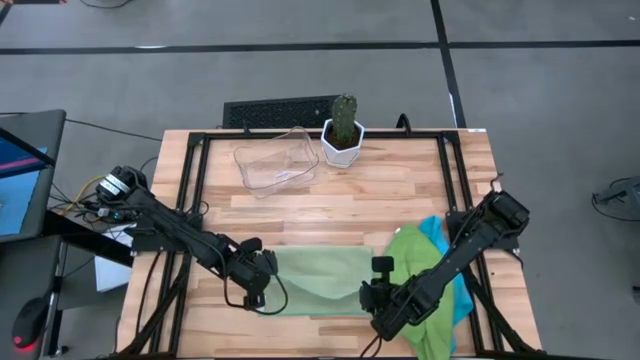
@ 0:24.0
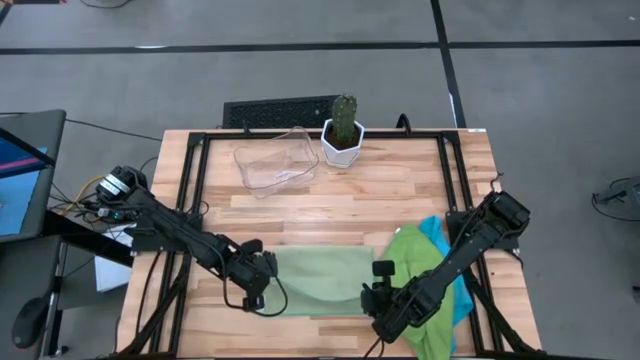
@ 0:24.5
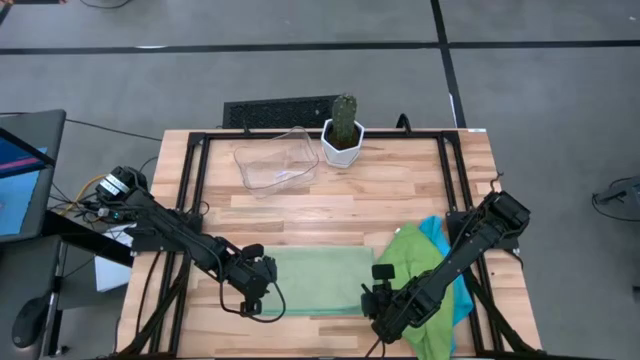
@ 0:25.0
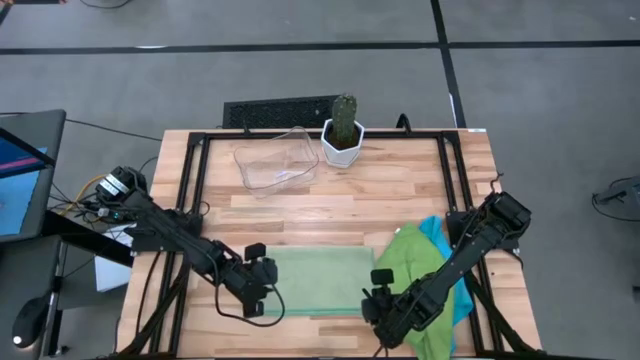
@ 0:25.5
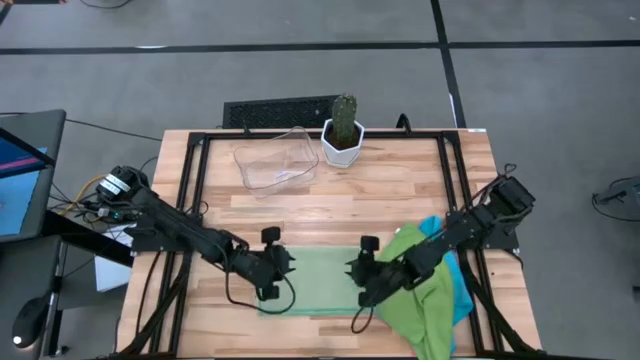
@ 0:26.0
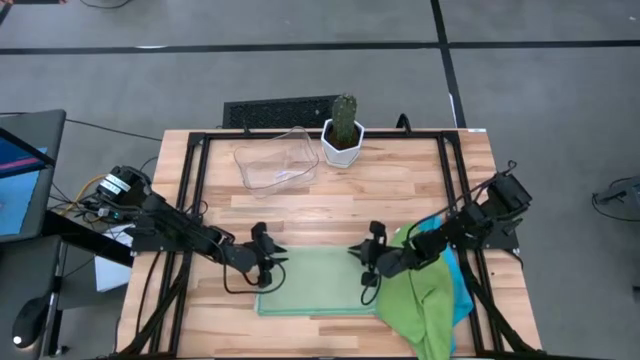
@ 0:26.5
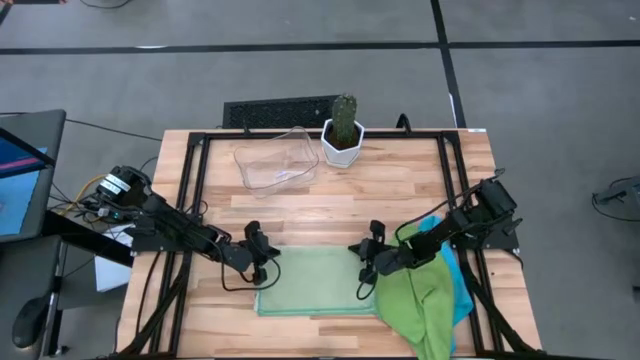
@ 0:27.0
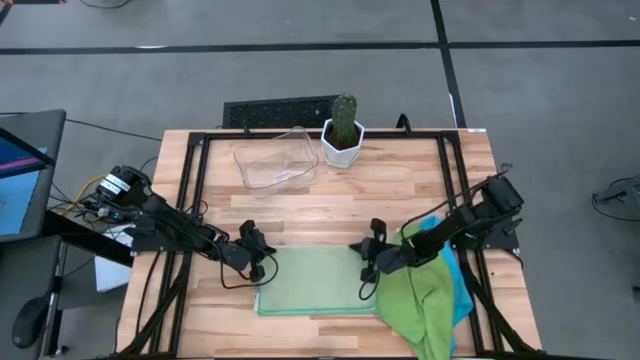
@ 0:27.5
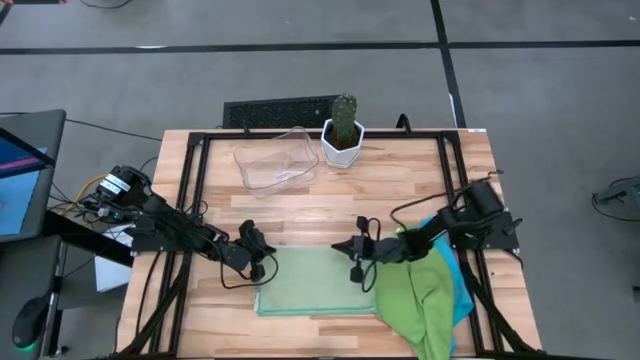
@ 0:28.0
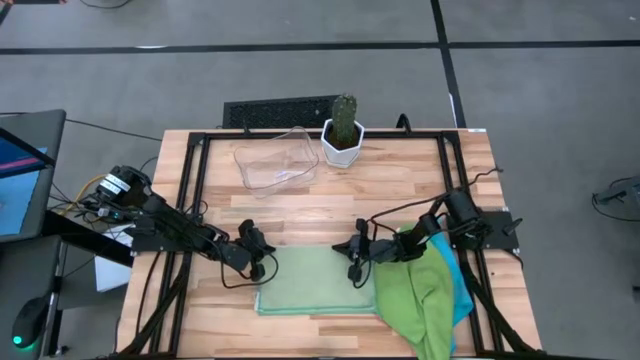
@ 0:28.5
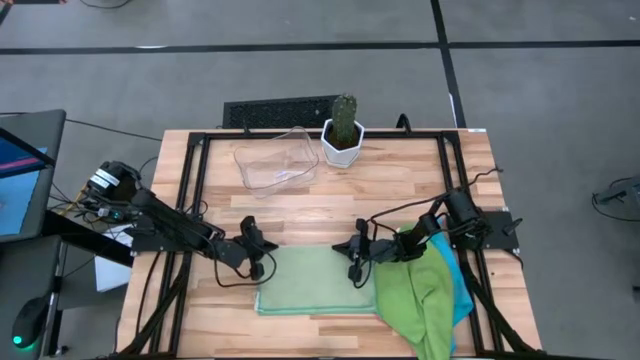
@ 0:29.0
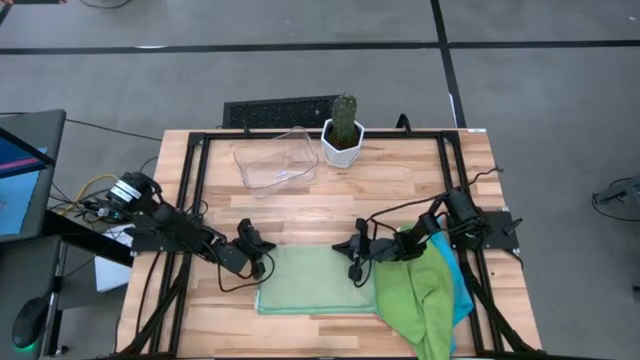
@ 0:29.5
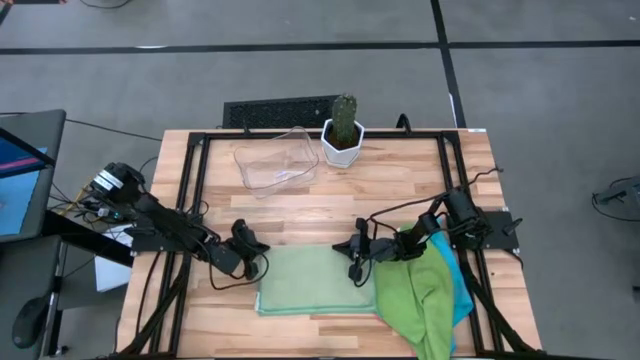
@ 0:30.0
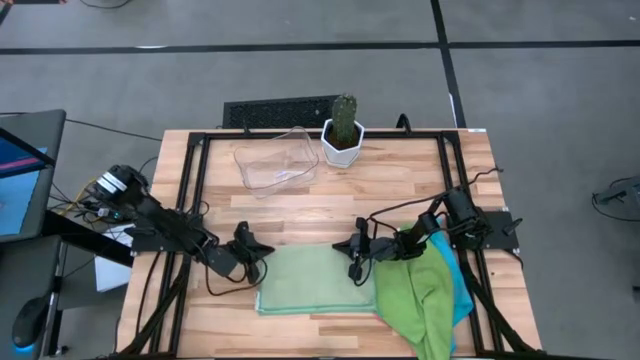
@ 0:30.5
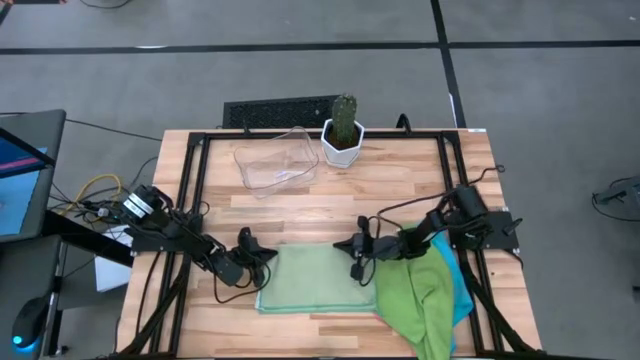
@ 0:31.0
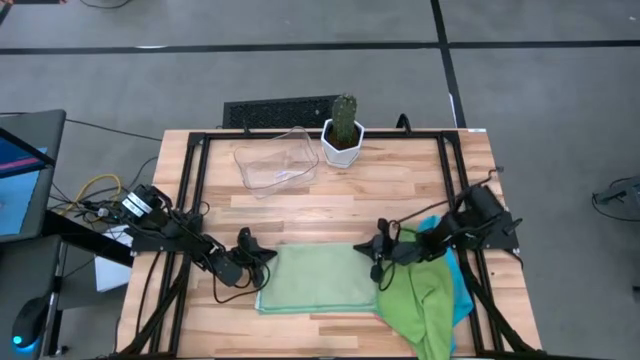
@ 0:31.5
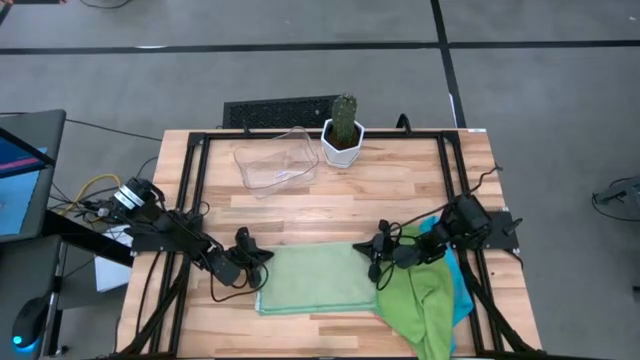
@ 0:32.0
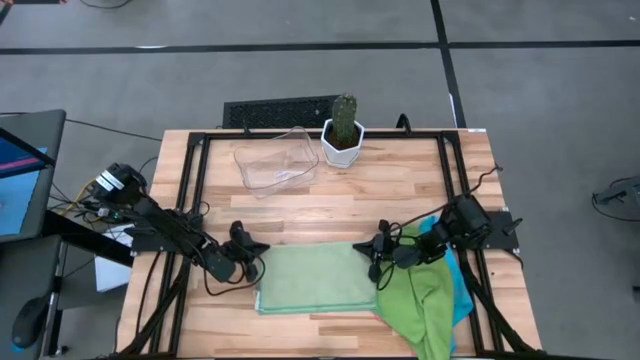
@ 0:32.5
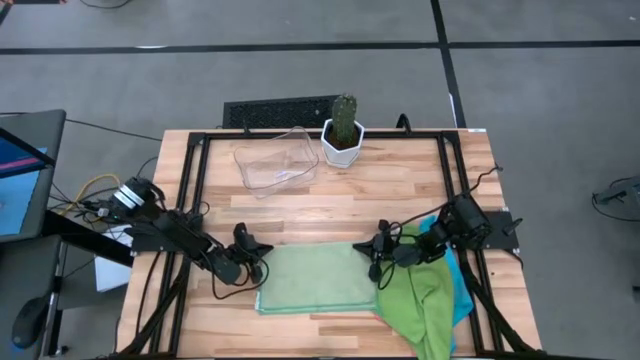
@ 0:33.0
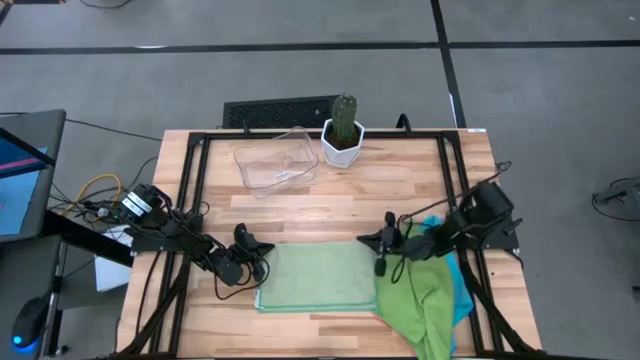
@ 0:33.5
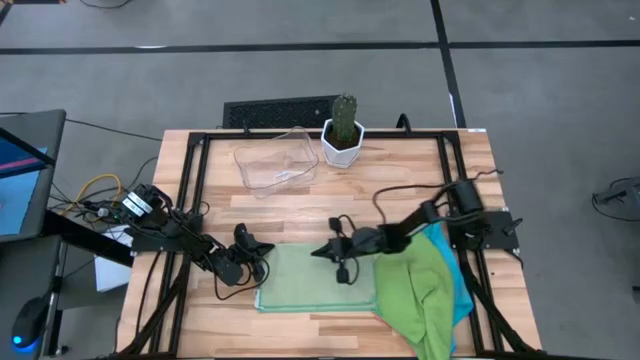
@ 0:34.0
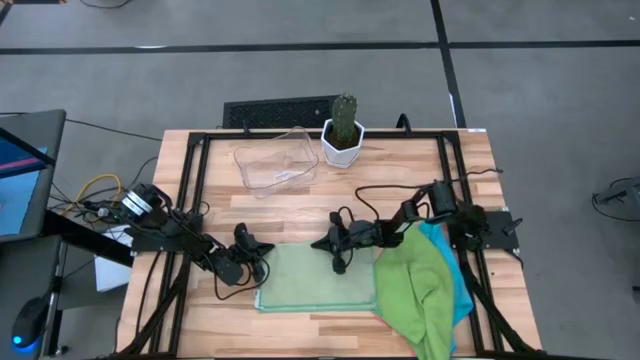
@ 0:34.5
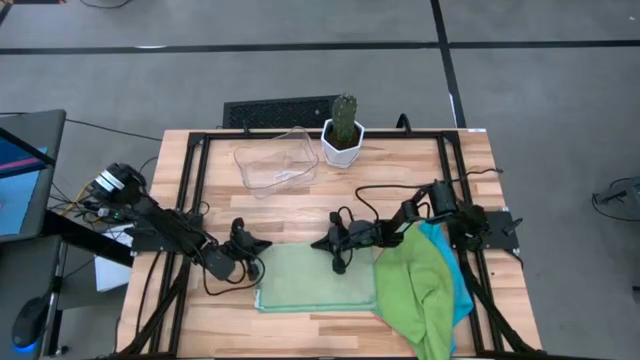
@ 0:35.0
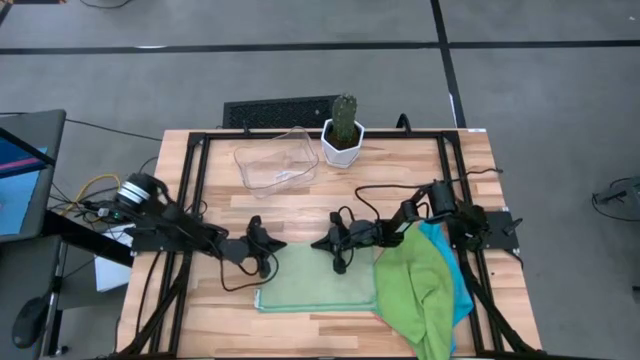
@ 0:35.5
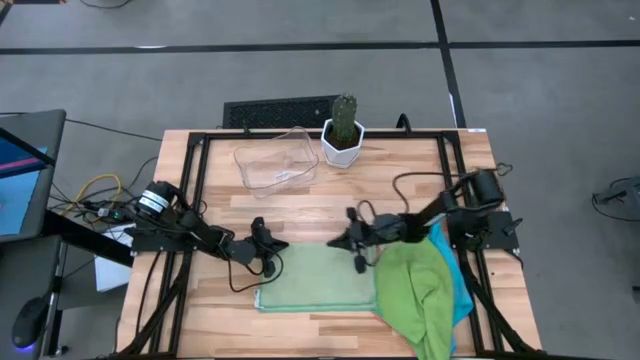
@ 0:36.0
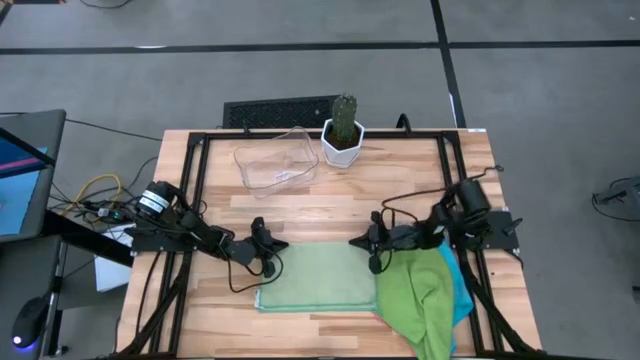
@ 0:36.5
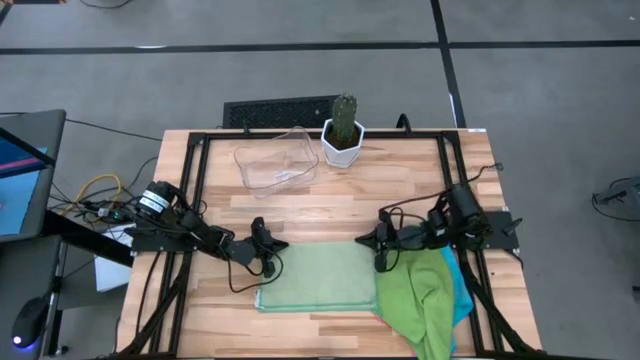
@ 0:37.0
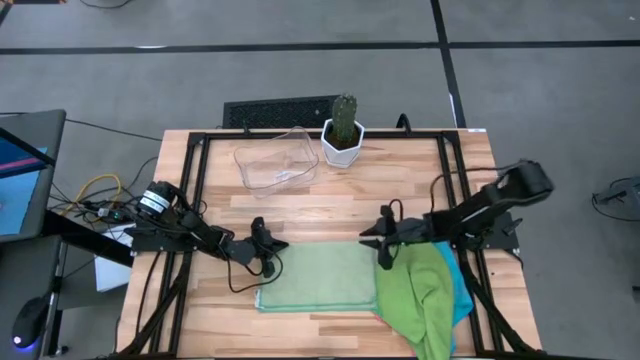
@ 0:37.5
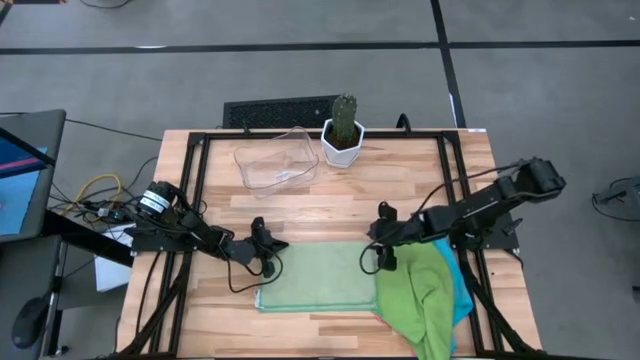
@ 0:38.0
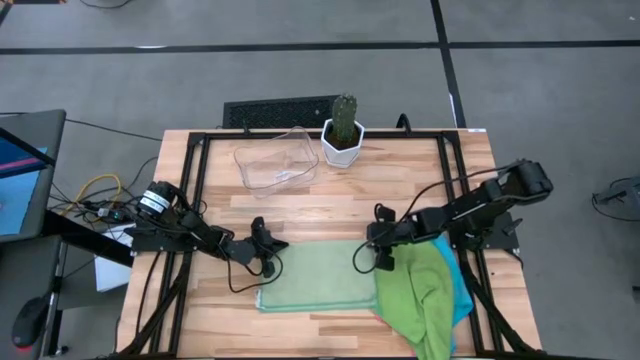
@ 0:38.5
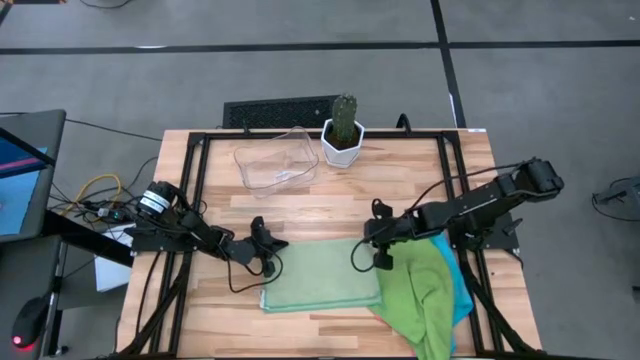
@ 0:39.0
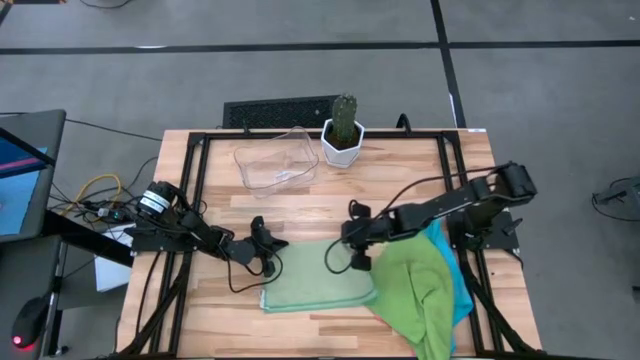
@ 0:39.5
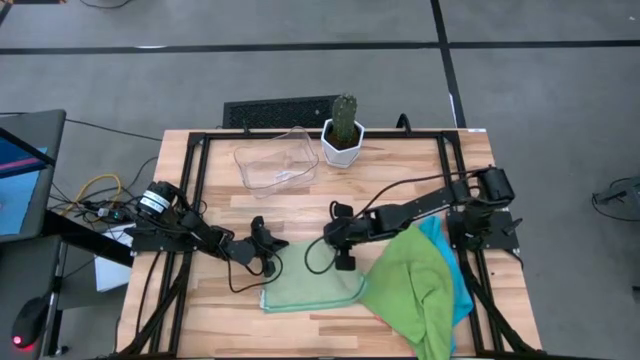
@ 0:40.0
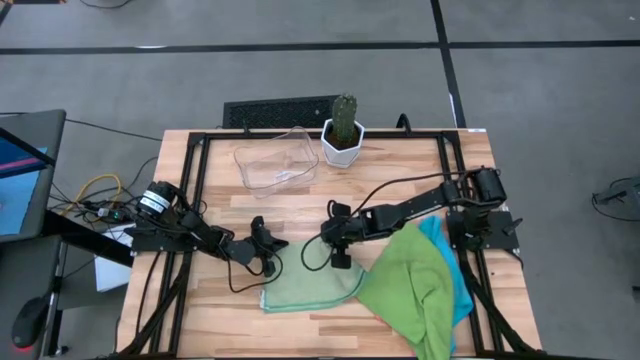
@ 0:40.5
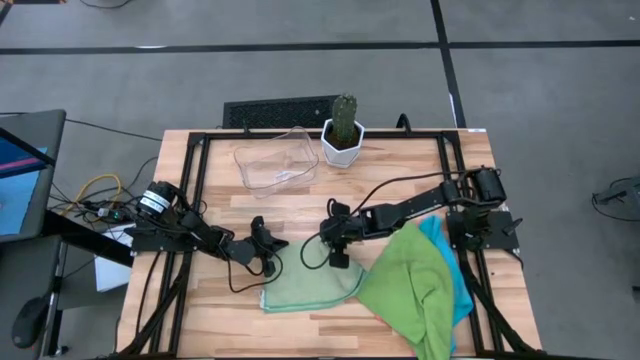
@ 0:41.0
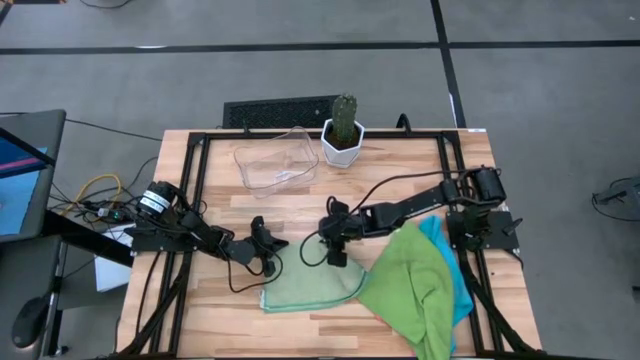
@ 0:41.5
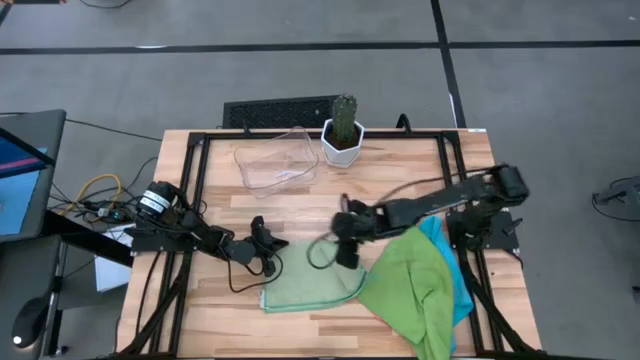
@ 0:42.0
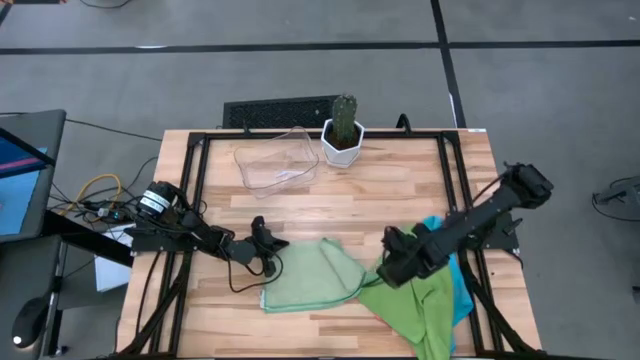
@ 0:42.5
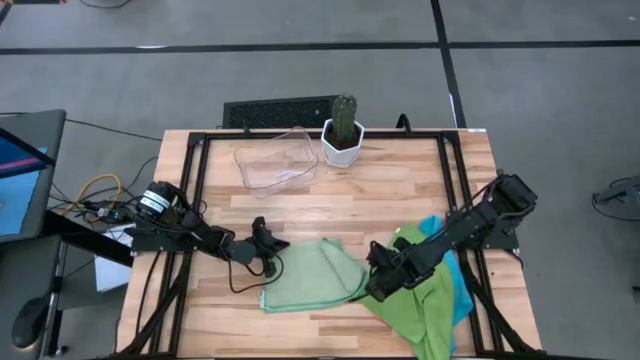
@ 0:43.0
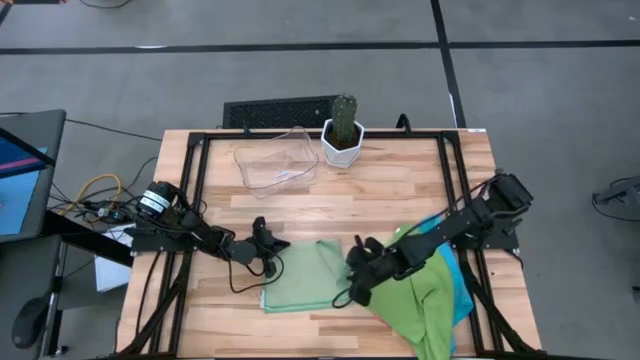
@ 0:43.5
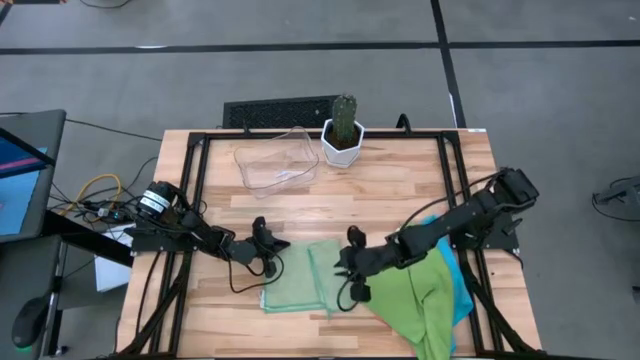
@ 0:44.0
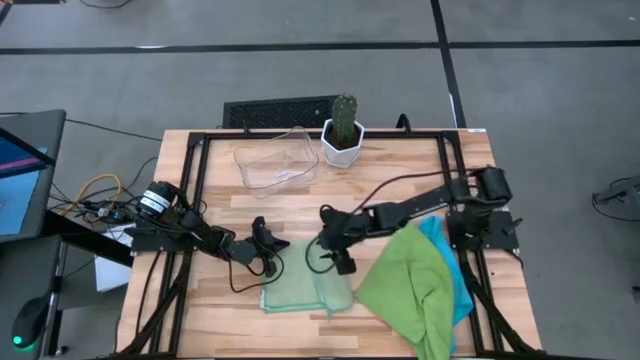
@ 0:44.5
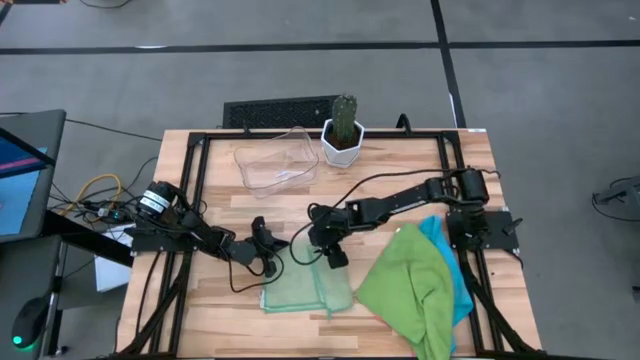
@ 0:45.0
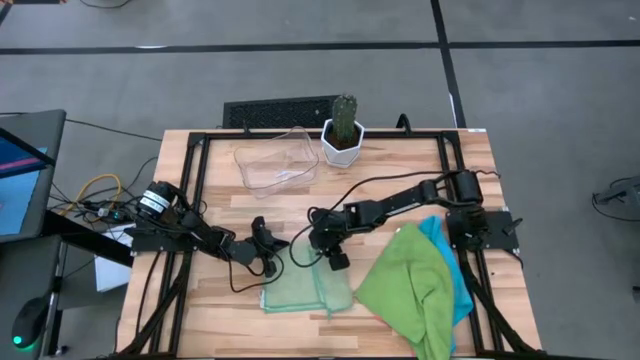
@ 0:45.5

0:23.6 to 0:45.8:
Task: Fold microfiber towels
Fold the light green microfiber towel
